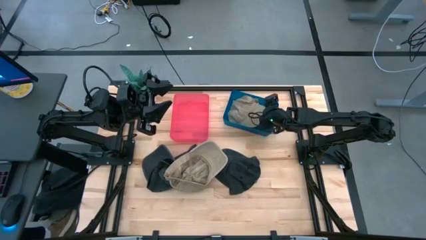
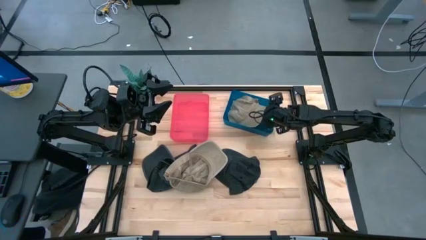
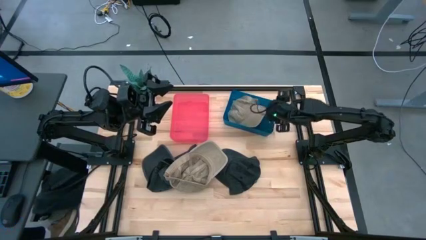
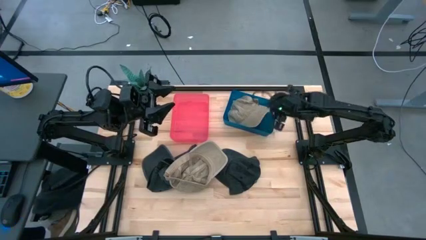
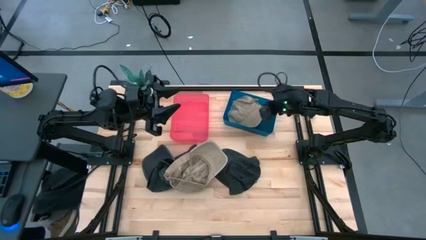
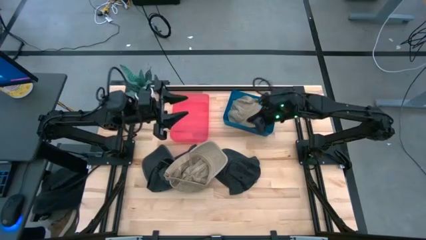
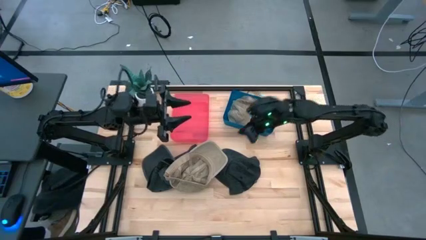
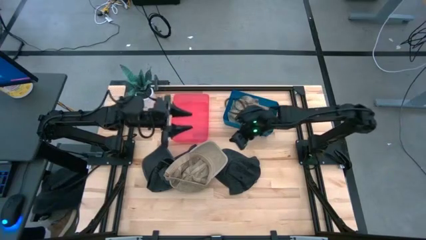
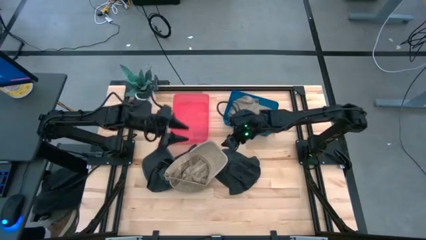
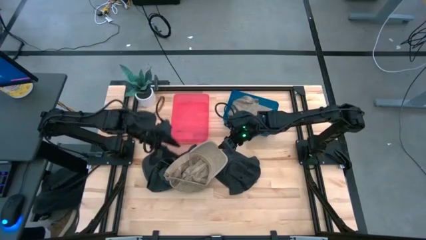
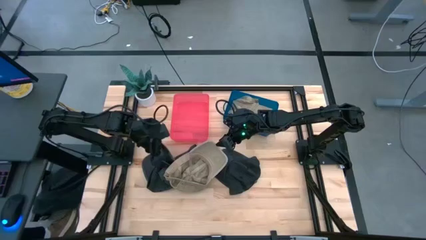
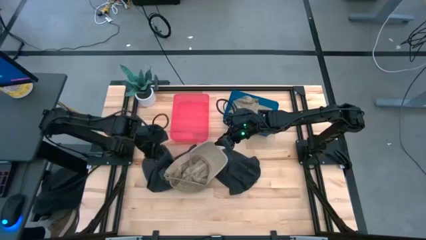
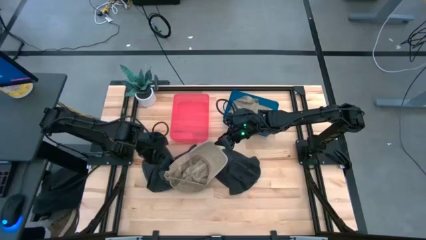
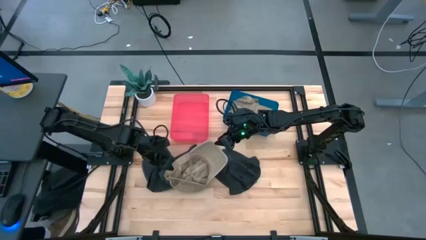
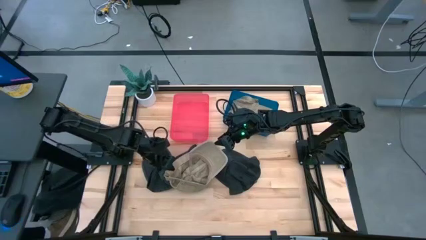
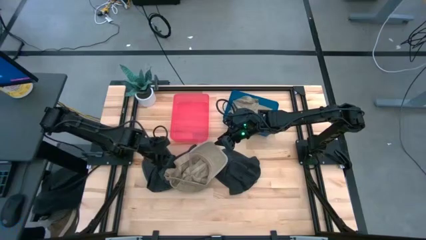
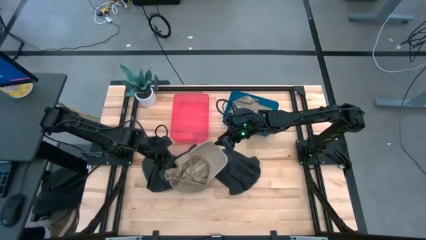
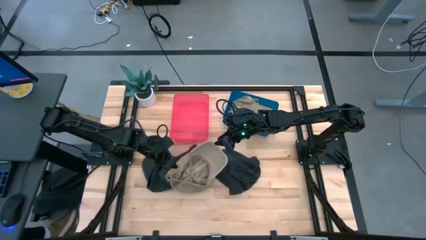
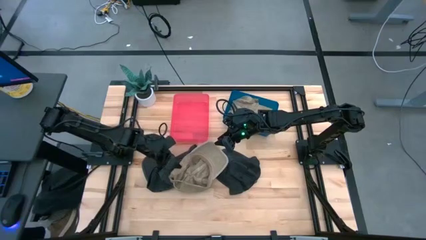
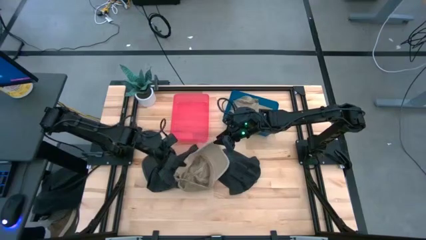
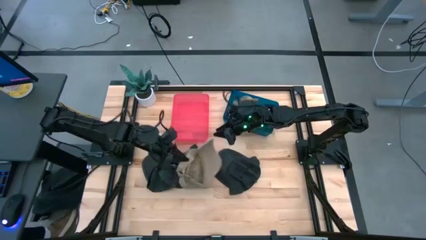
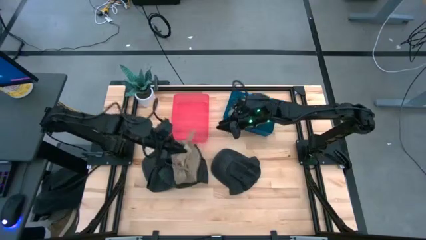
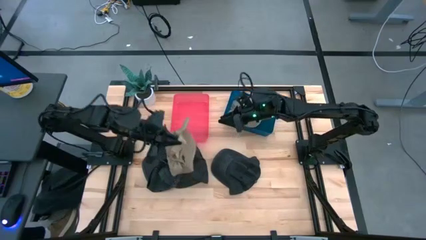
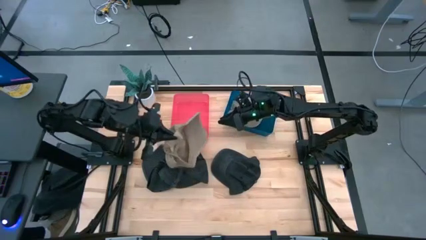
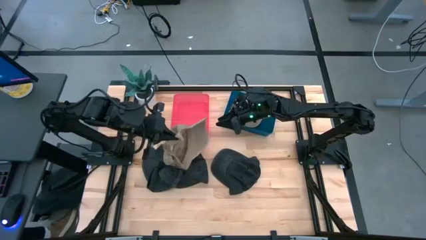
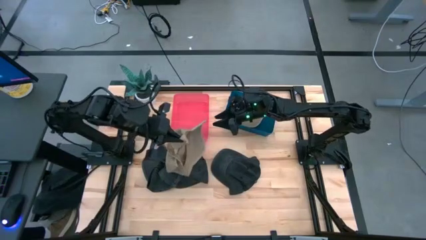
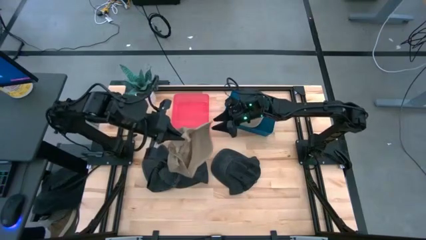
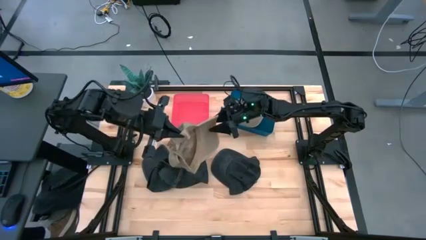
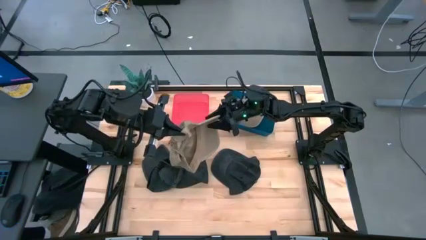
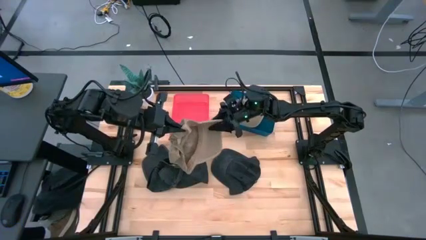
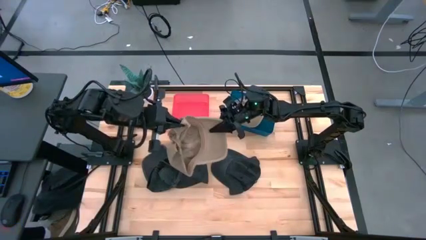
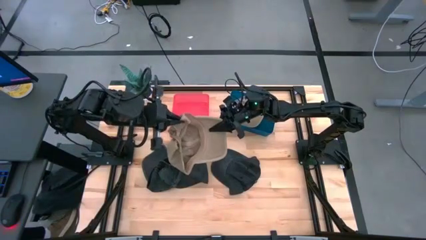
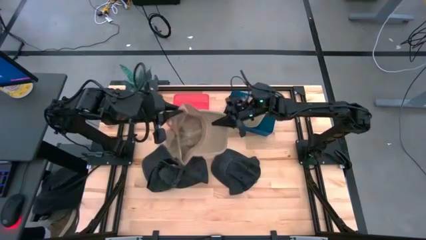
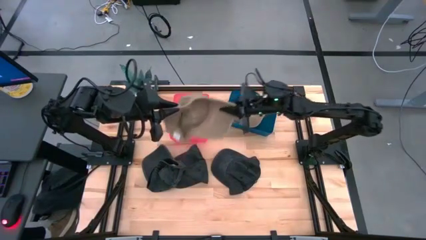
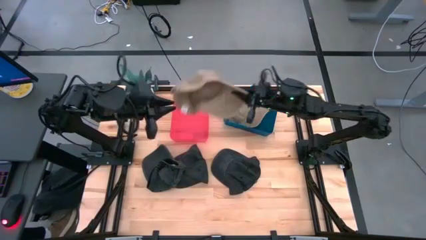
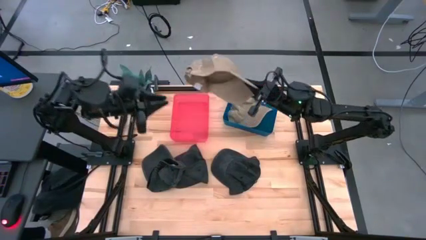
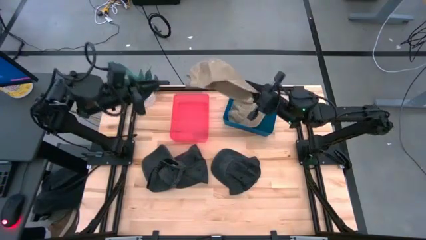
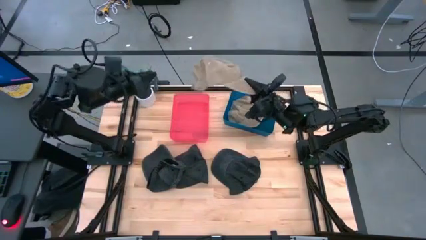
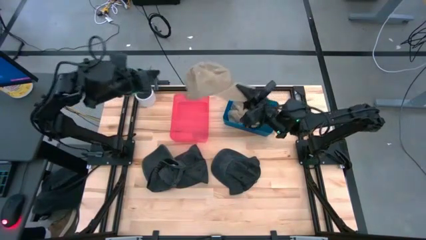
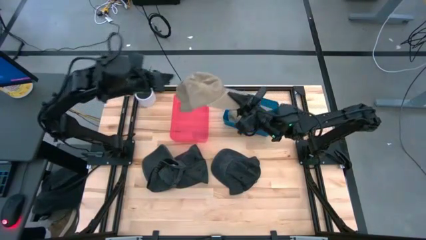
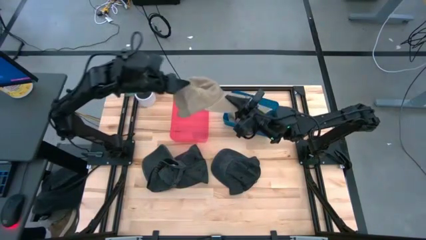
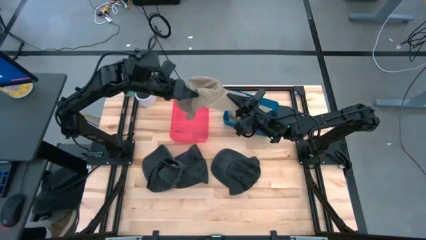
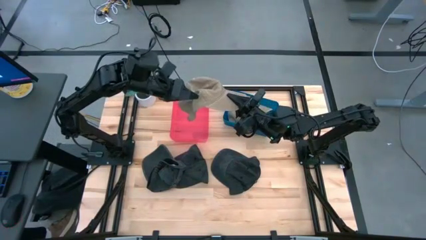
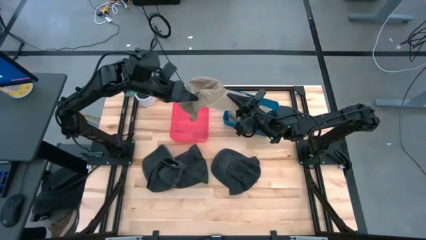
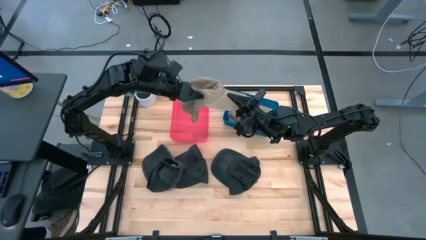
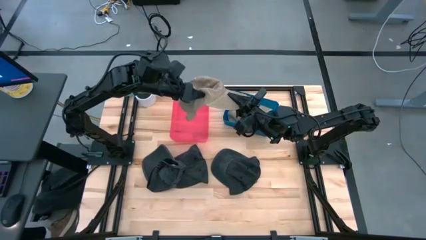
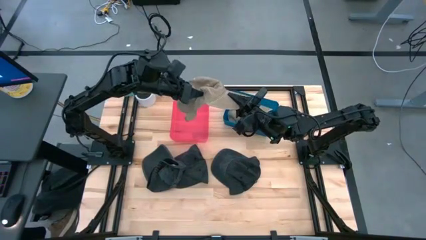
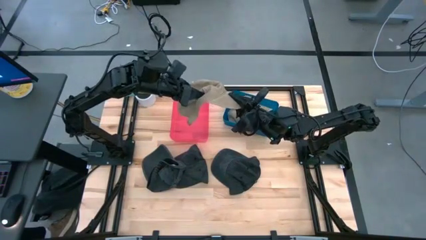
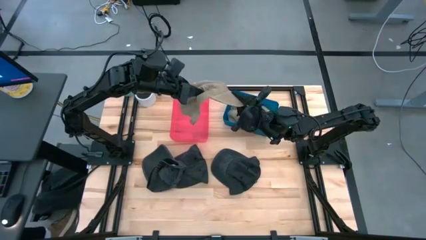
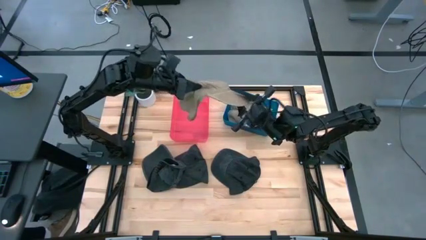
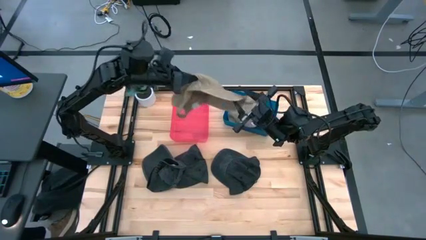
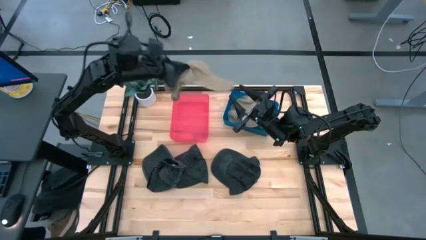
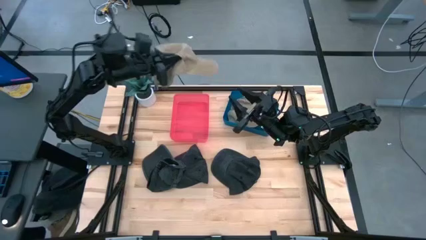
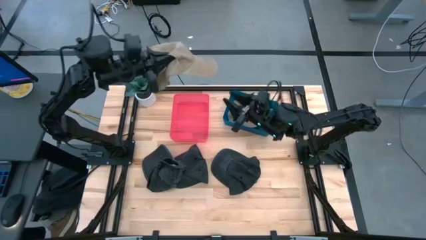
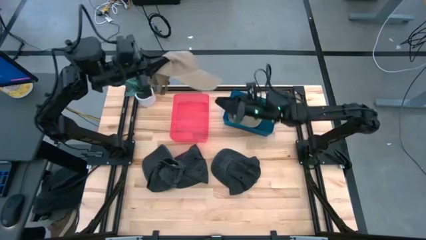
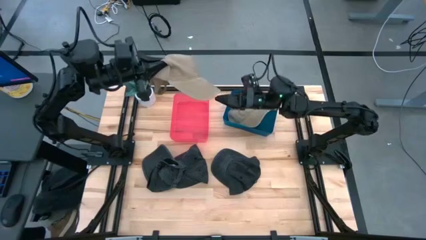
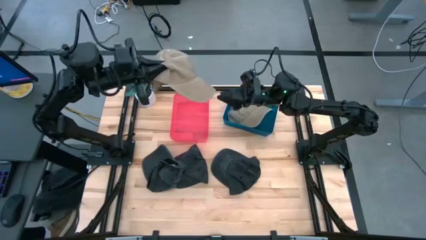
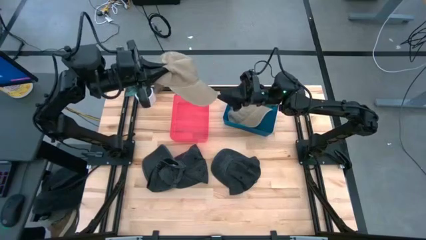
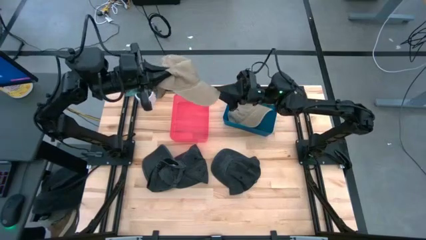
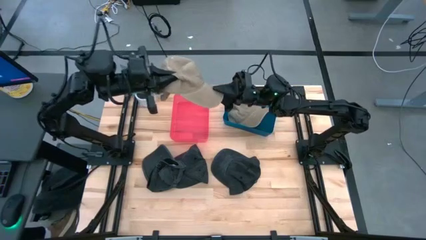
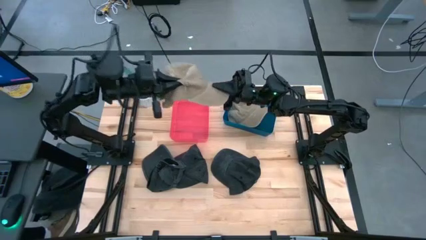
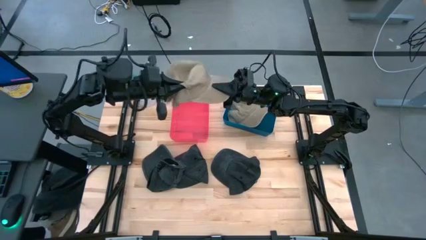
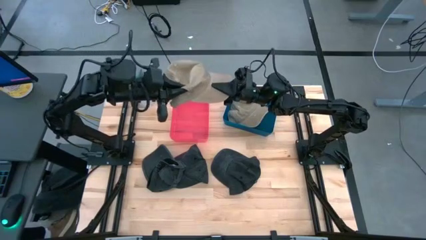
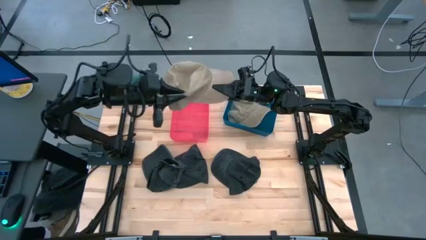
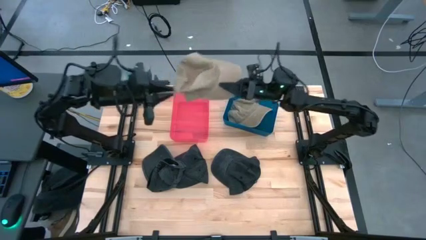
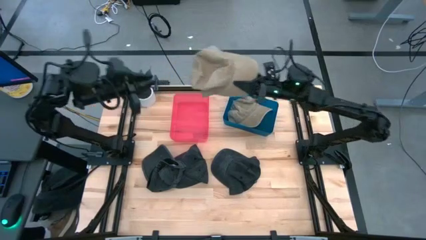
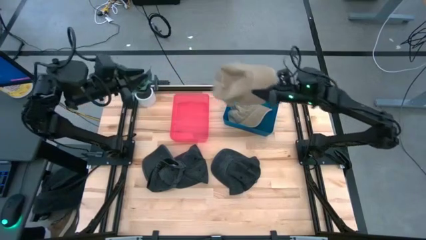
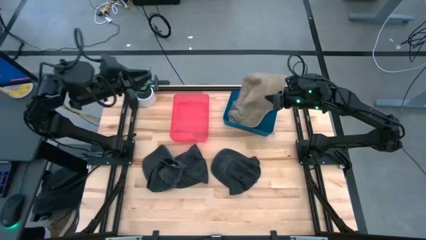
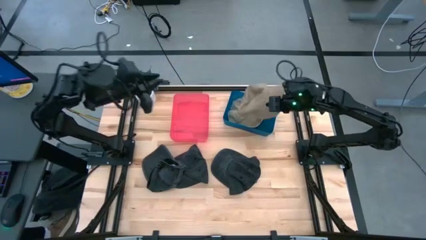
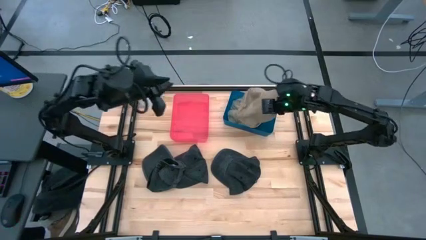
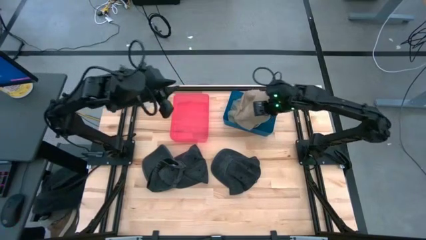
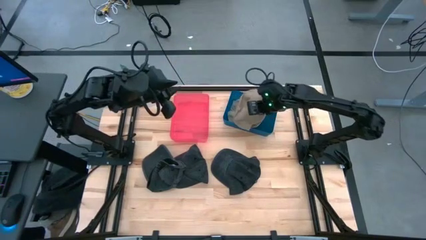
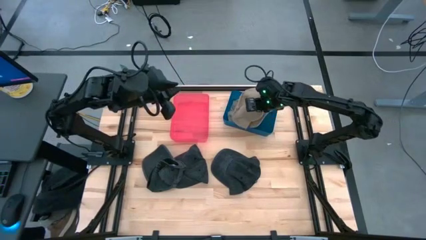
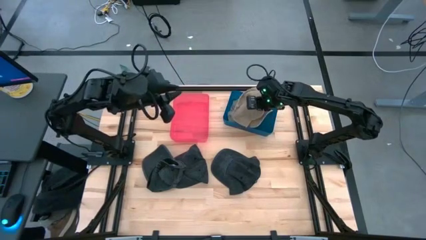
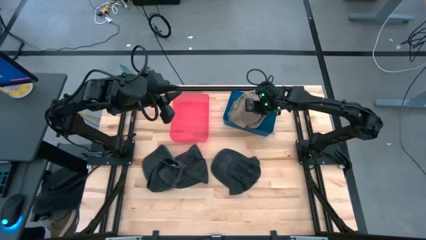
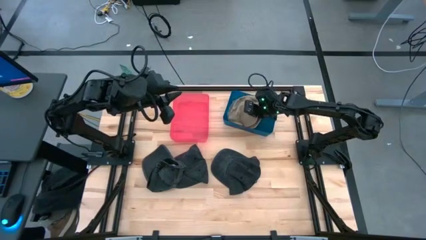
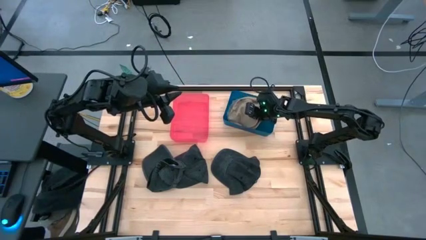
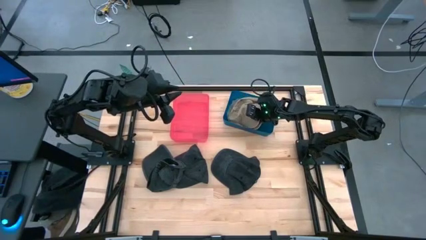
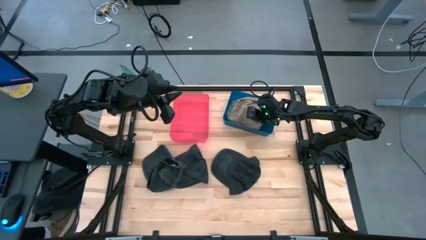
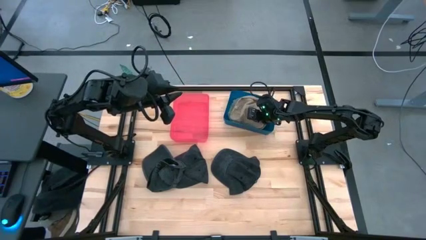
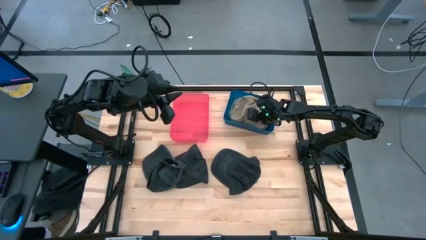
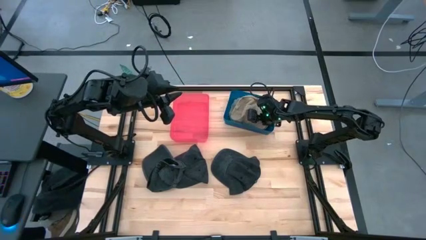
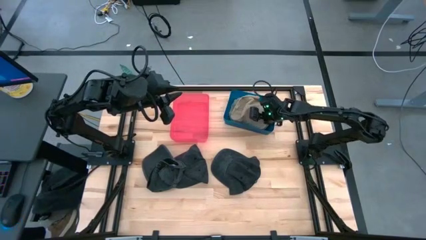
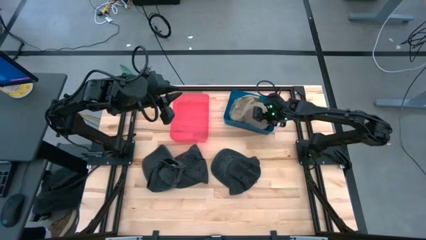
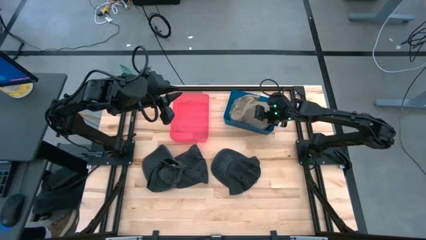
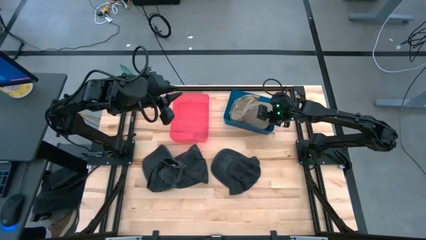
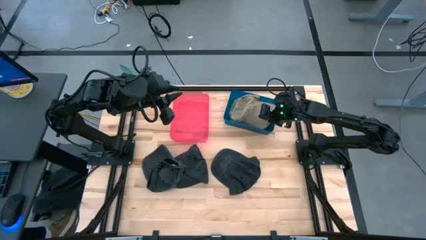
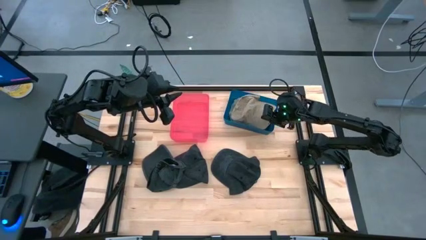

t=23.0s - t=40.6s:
Task: Pick & Place hat
Stack the brown cap on top of the brown cap on the blue bin
